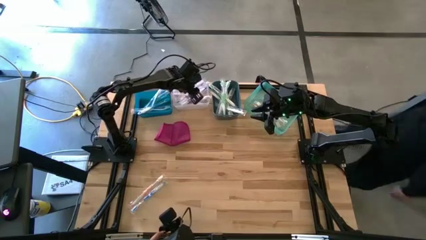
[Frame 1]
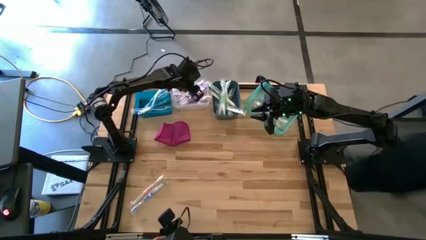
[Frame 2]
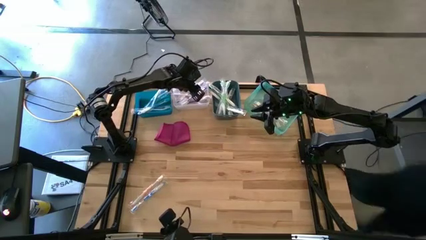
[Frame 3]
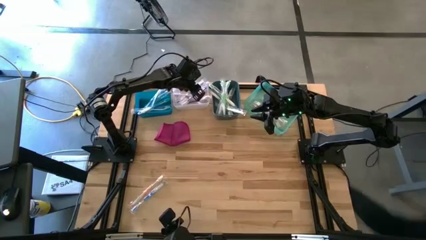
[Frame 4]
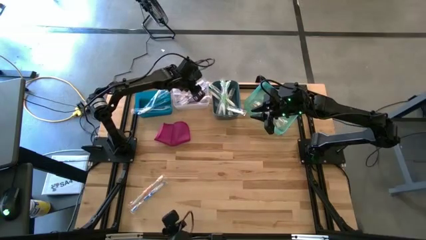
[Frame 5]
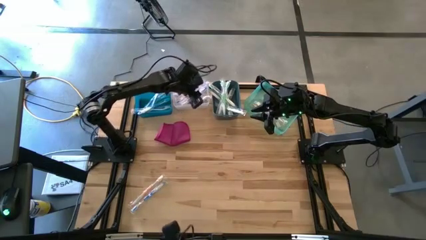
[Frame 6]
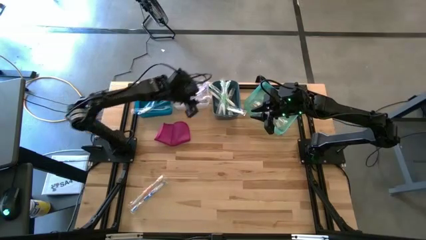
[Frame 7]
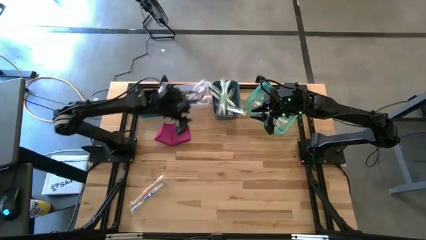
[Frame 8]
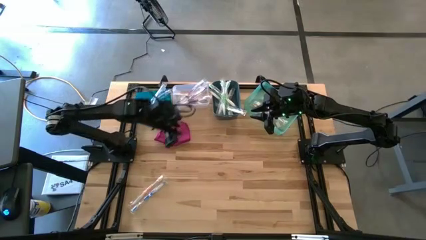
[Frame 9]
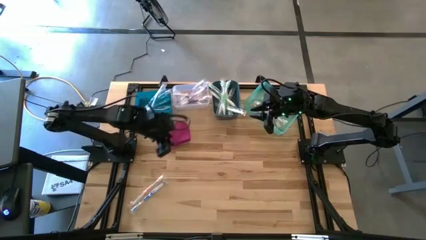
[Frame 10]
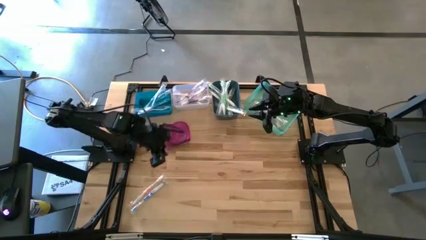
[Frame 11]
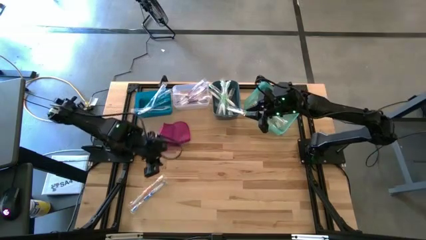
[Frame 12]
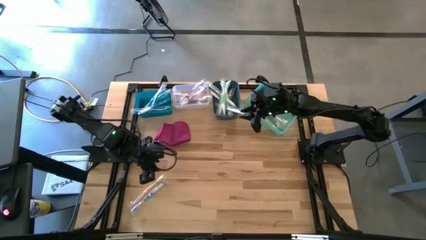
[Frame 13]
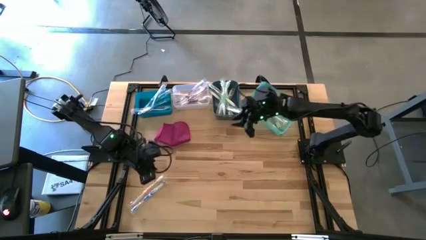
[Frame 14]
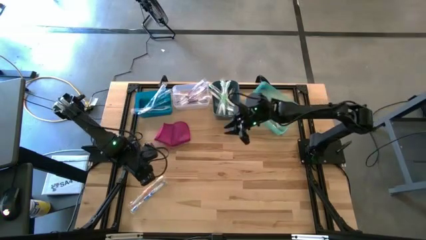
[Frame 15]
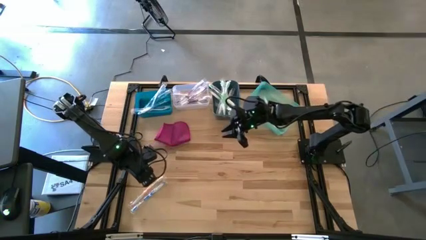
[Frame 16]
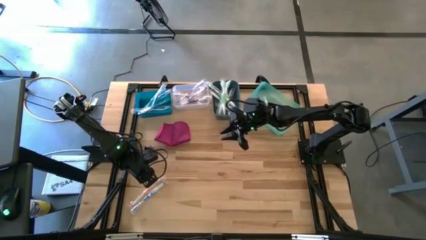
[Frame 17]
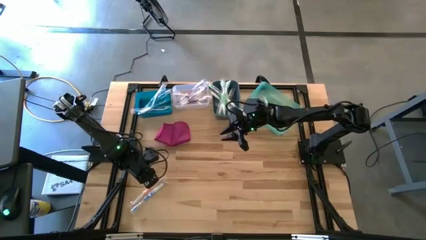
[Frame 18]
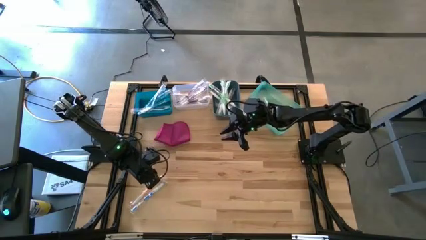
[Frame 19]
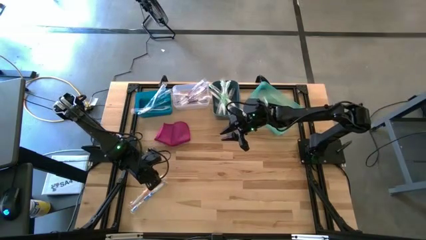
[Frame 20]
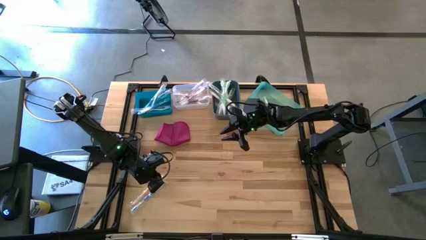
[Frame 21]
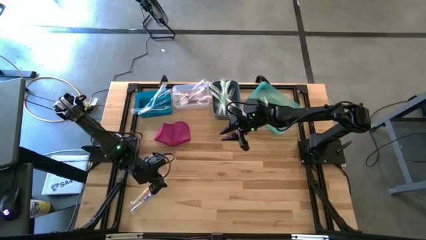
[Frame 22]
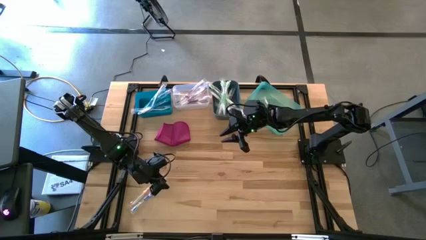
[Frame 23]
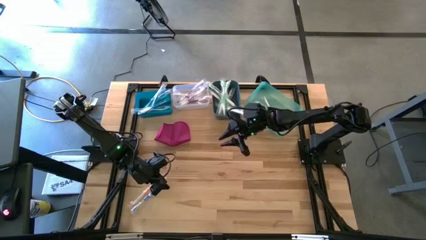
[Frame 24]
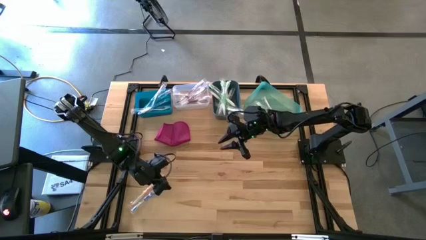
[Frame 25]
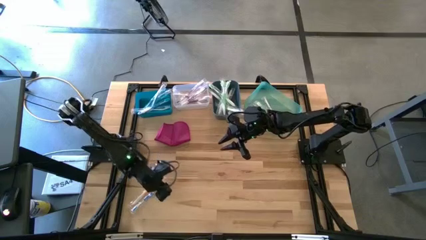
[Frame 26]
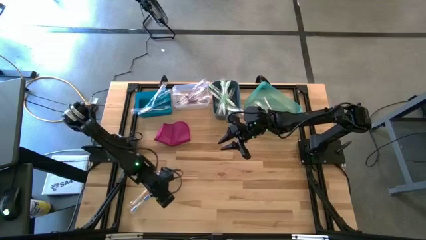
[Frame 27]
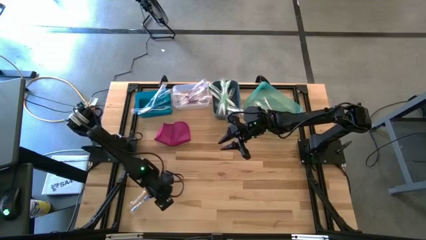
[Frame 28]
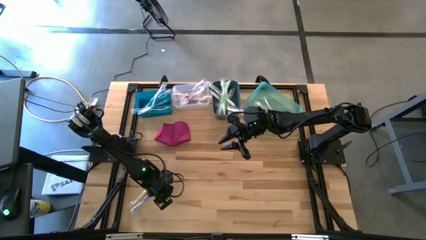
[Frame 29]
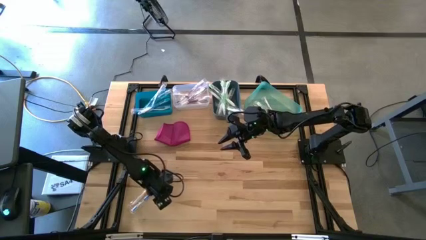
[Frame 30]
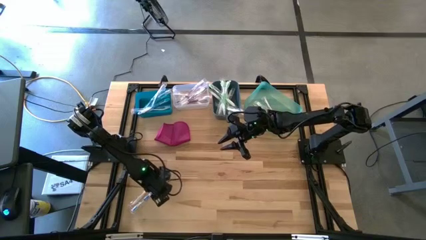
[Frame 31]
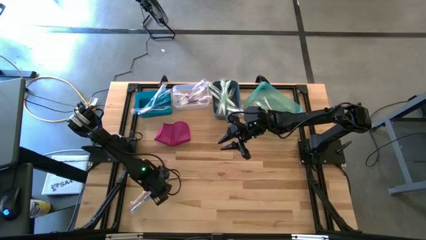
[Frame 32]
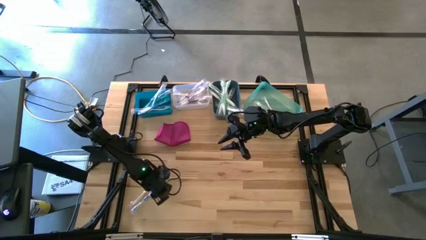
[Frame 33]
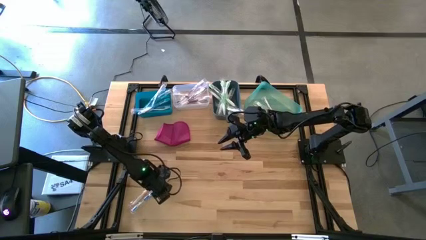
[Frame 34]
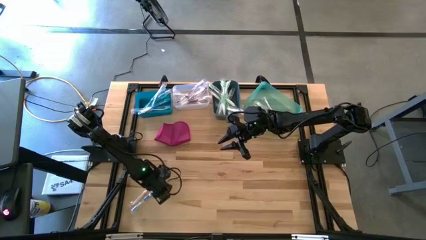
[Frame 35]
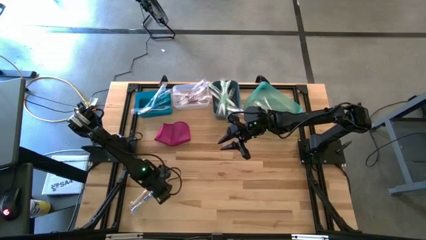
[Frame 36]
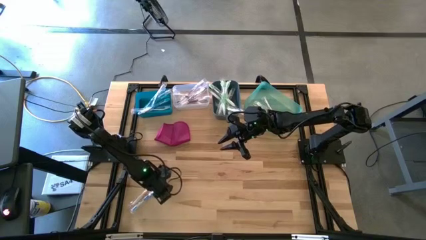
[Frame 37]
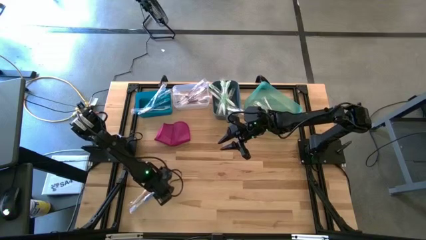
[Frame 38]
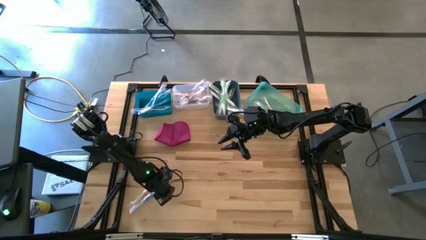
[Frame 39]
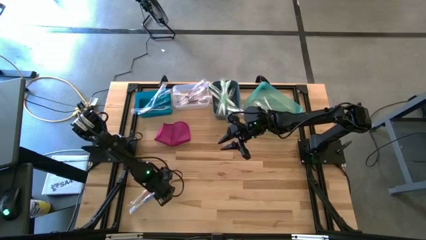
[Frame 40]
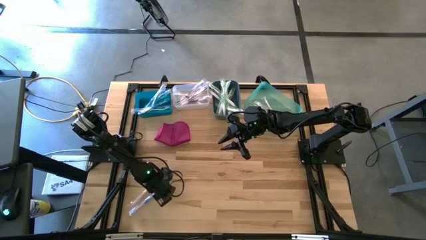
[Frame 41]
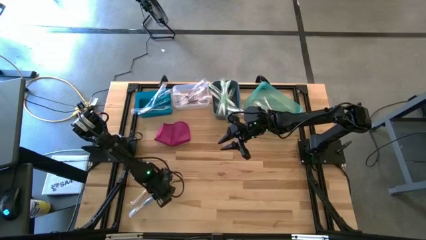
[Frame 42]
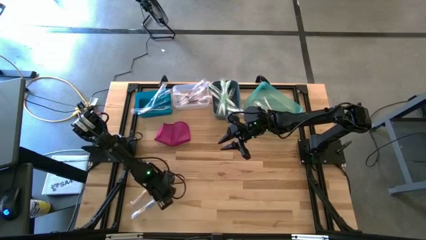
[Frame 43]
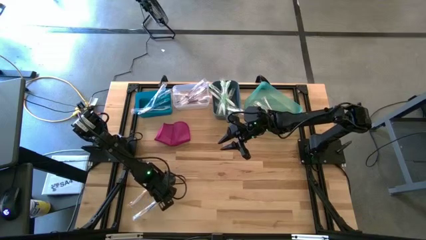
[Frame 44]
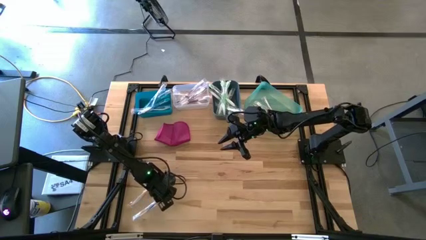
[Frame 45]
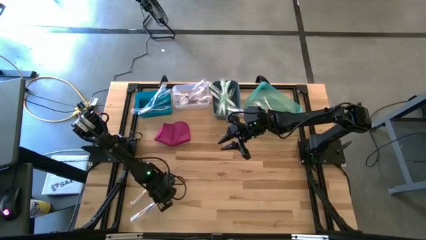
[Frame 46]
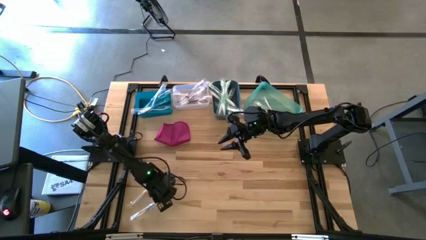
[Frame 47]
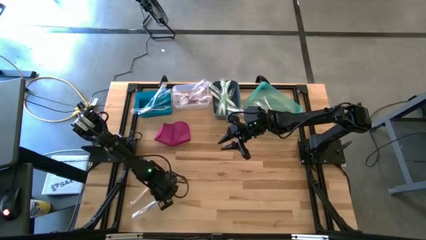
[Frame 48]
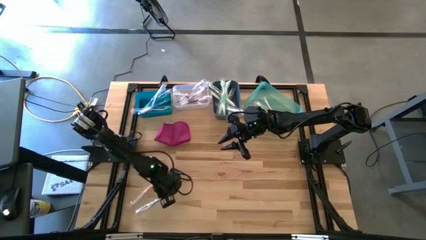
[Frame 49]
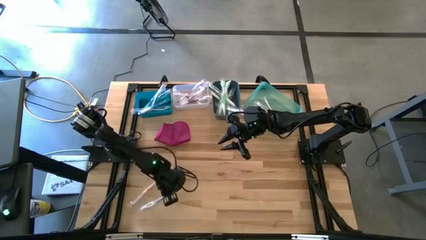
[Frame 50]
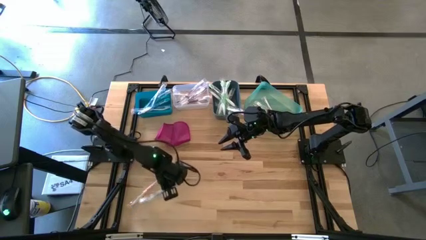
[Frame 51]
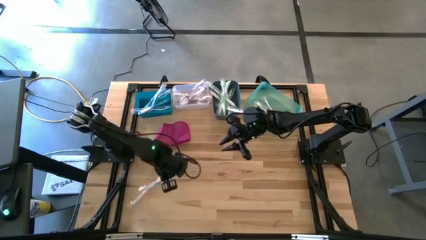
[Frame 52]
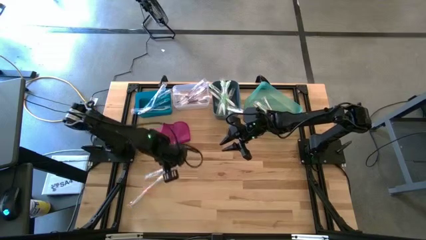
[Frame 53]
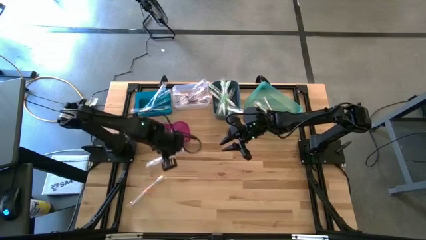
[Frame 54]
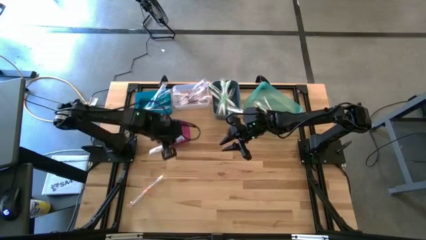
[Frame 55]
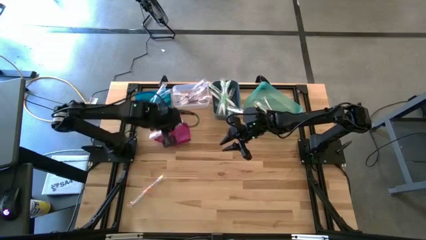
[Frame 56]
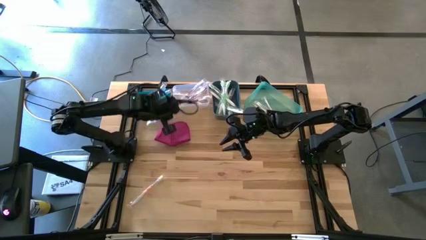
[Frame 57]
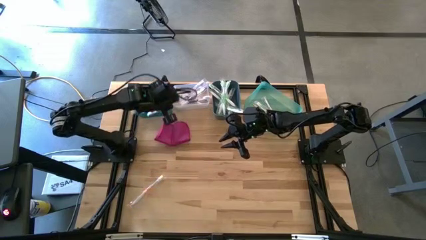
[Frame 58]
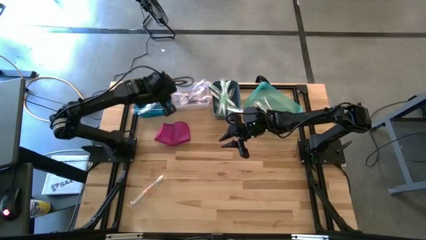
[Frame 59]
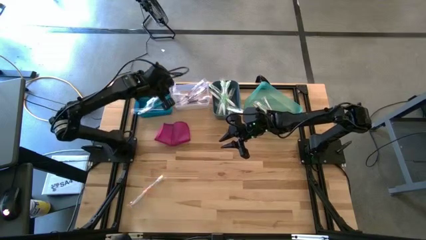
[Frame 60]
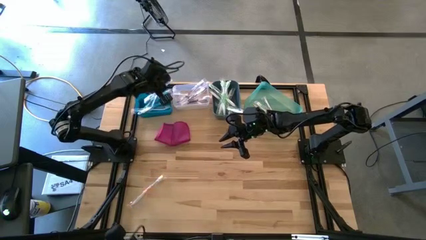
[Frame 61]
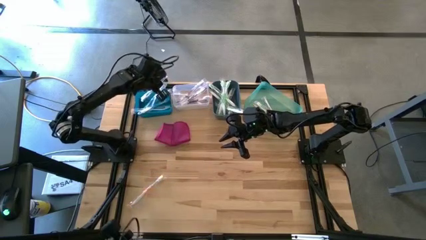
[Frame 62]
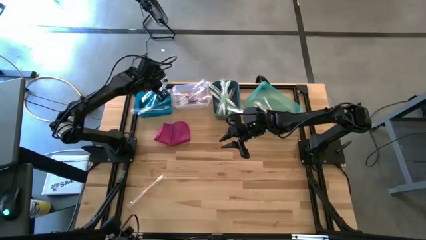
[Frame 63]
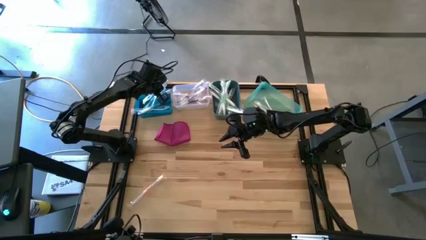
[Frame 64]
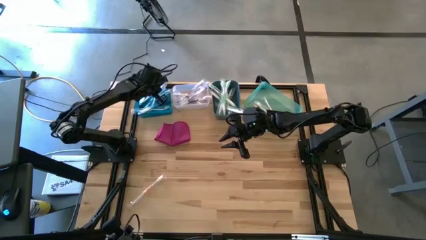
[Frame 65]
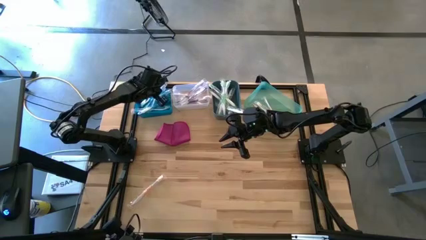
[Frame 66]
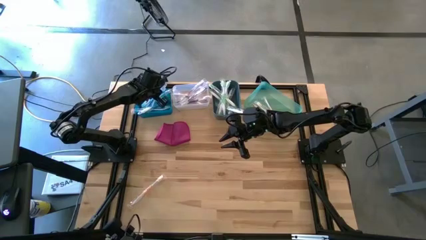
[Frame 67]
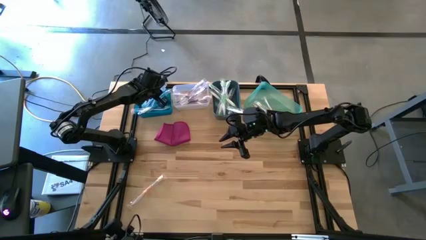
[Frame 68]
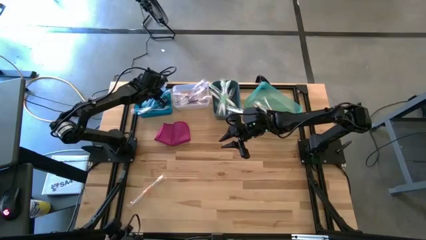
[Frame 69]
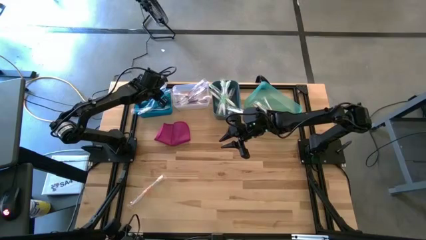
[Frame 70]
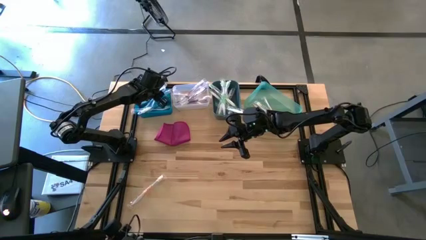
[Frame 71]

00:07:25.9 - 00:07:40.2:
Task: Pick & Place Toothbrushes
Put the blue toothbrush into the blue bin

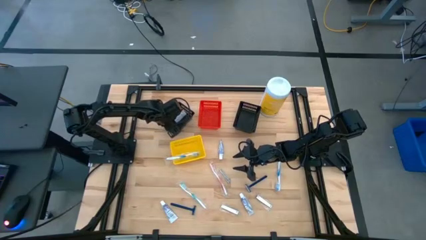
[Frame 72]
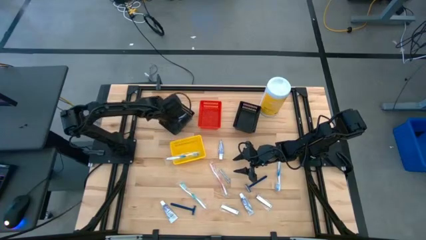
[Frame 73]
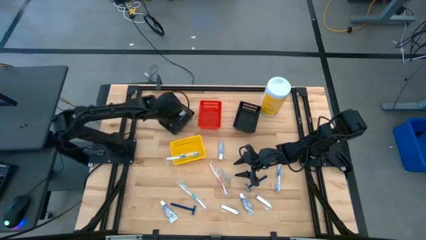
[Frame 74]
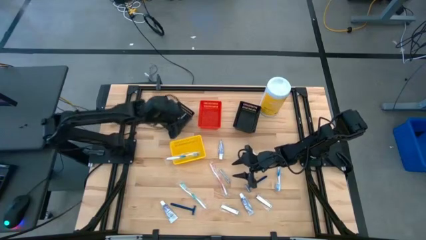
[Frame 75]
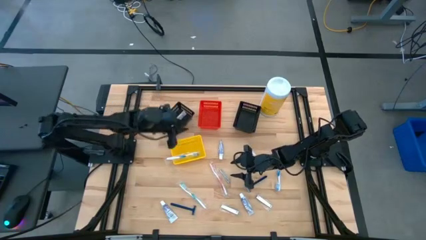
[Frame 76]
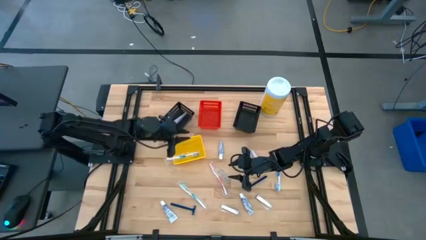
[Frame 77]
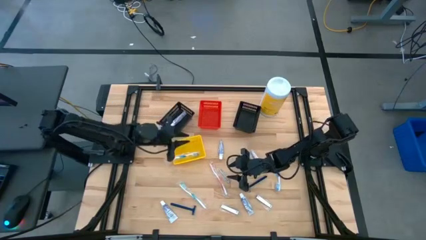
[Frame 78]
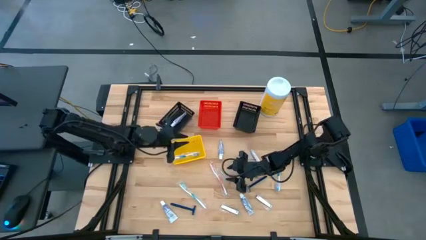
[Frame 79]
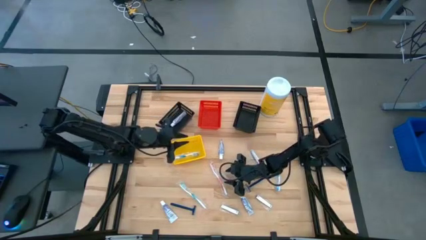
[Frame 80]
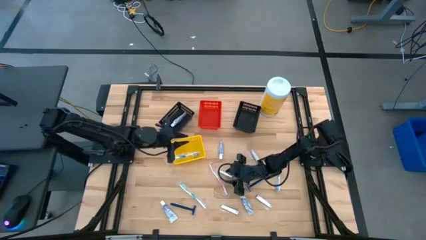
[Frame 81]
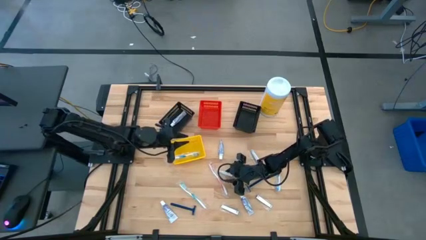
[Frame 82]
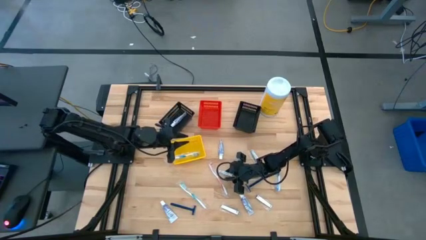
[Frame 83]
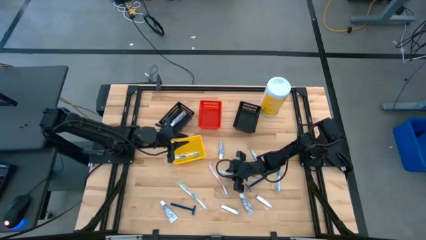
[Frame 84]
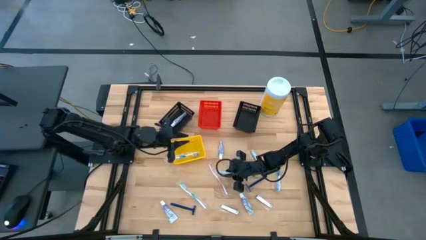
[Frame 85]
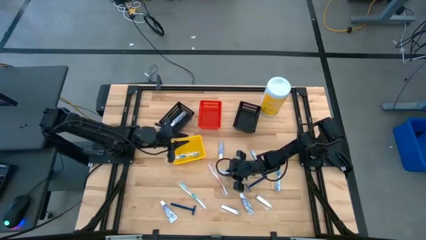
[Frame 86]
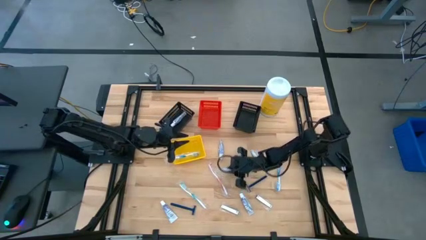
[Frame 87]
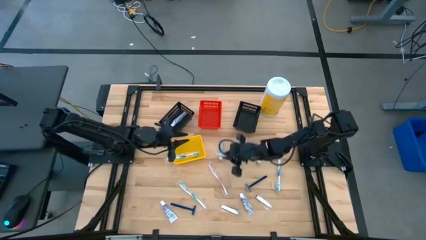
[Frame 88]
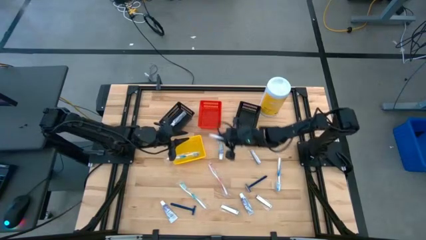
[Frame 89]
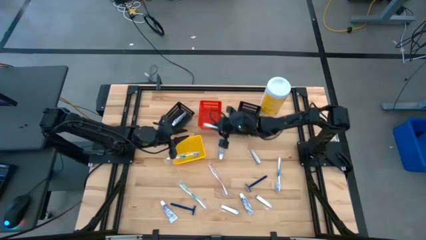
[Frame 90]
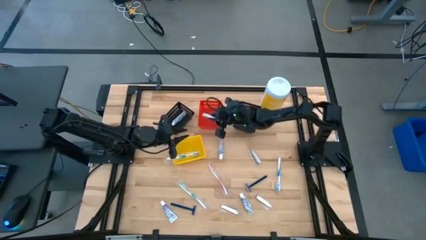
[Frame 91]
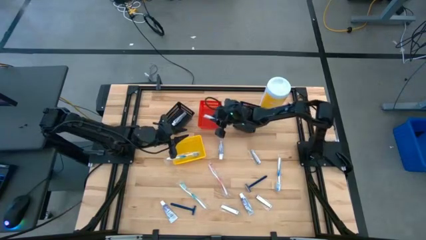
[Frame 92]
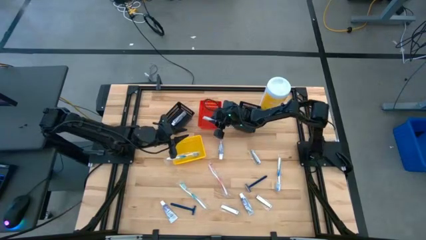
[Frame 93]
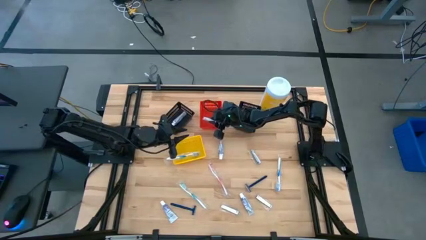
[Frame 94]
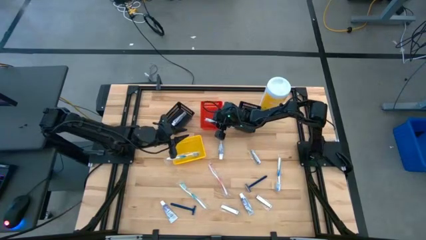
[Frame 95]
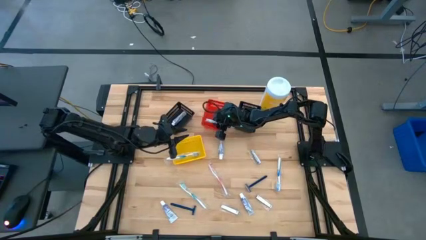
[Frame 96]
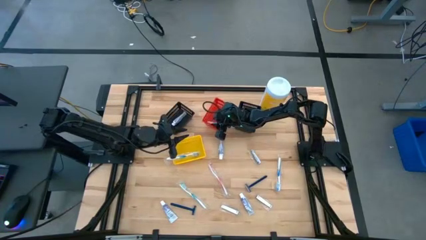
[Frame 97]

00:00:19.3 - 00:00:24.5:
Task: Pick & Place Travel size toiletries
Put the silver nail cutter into the red bin
